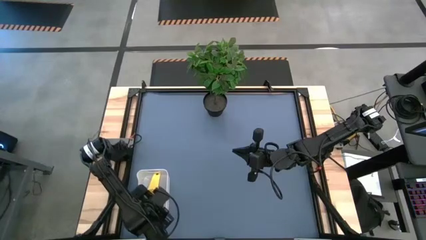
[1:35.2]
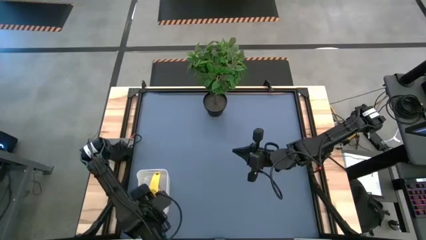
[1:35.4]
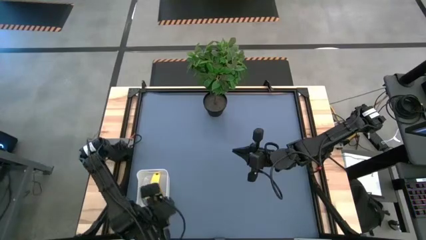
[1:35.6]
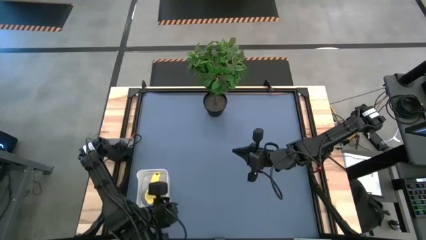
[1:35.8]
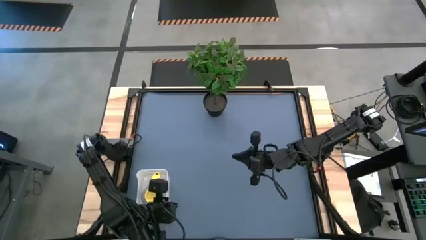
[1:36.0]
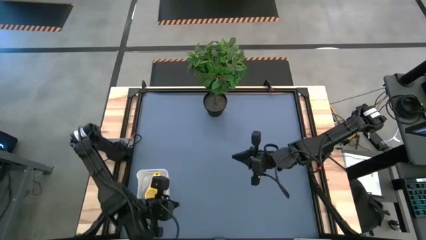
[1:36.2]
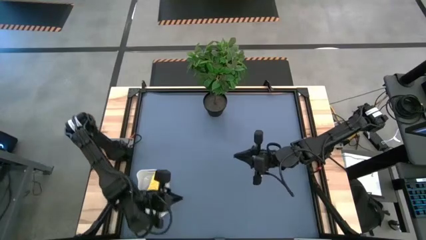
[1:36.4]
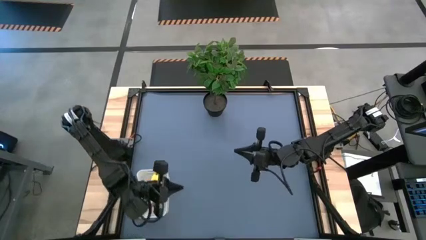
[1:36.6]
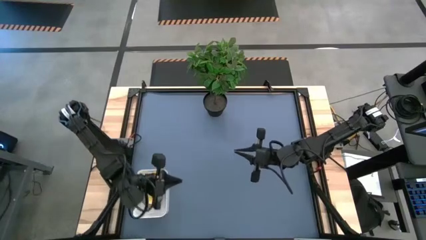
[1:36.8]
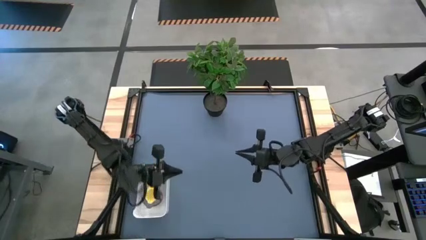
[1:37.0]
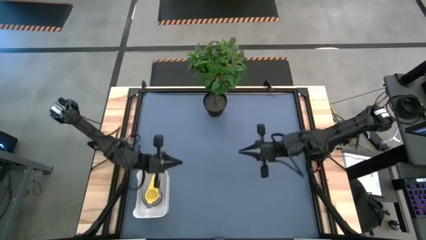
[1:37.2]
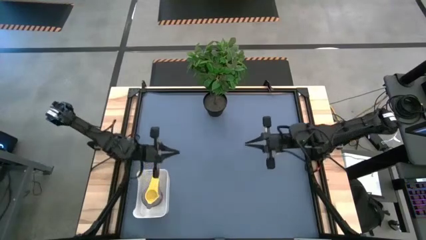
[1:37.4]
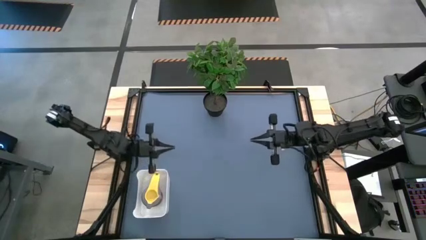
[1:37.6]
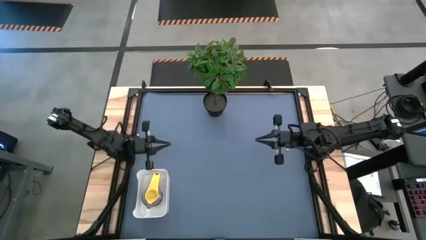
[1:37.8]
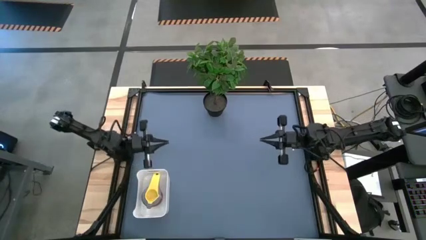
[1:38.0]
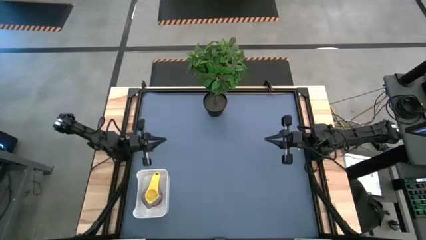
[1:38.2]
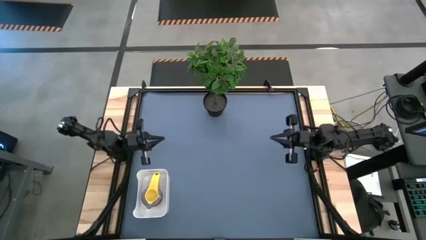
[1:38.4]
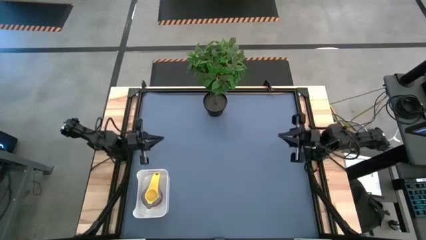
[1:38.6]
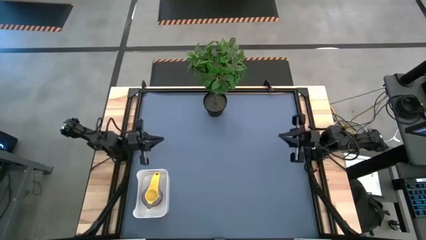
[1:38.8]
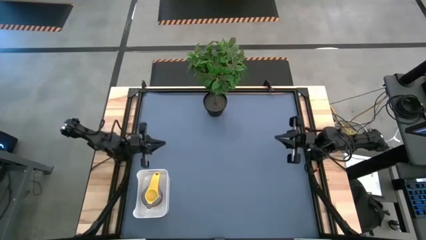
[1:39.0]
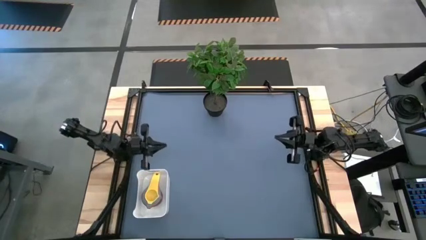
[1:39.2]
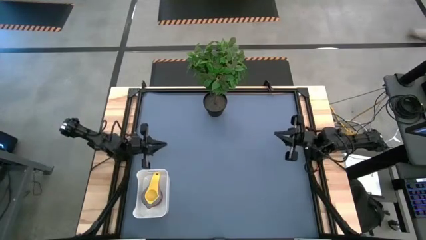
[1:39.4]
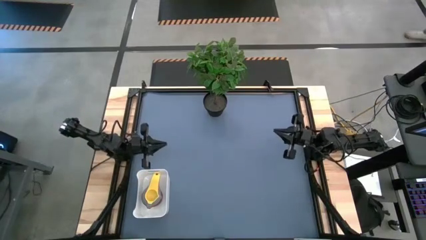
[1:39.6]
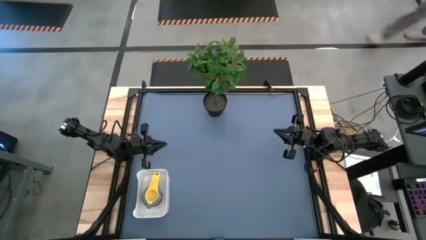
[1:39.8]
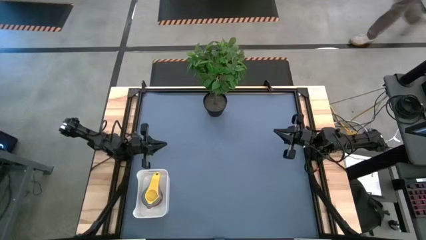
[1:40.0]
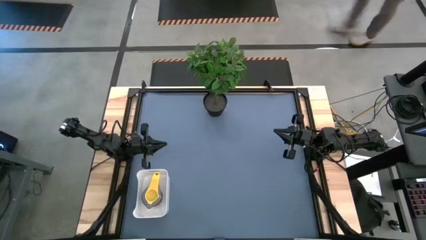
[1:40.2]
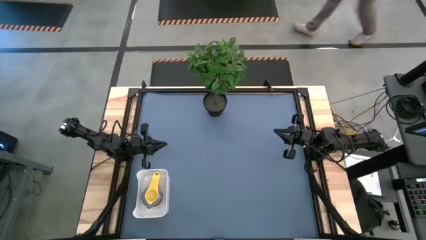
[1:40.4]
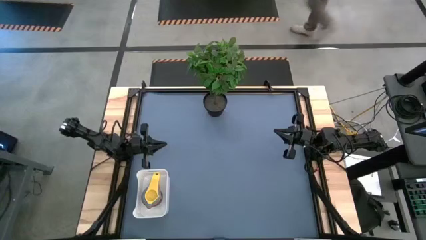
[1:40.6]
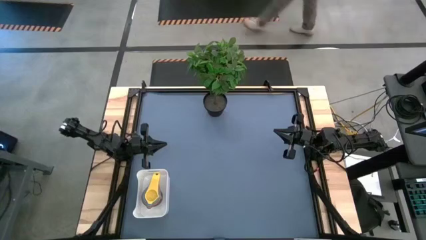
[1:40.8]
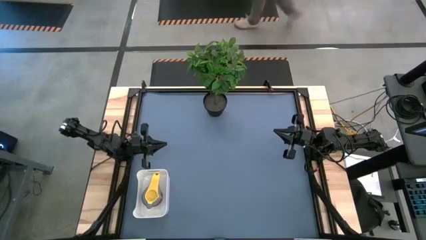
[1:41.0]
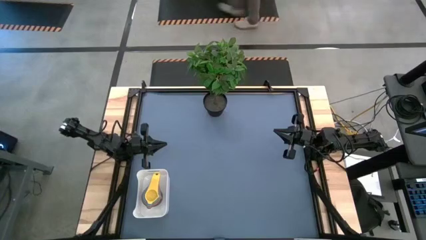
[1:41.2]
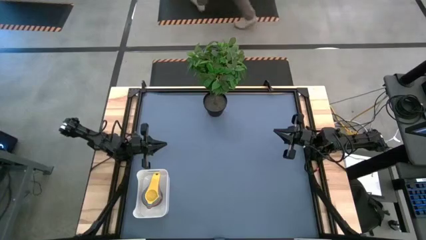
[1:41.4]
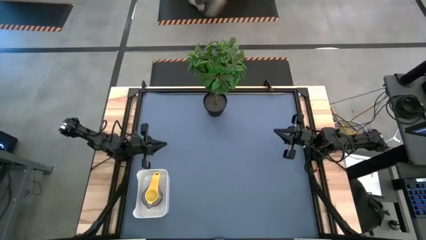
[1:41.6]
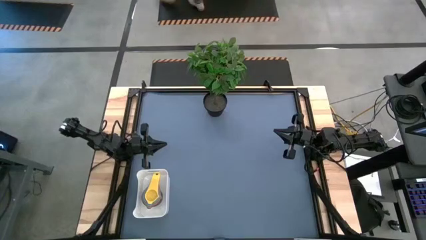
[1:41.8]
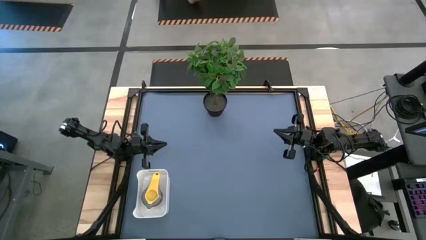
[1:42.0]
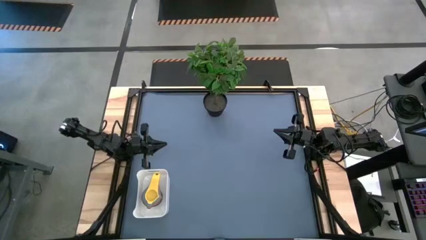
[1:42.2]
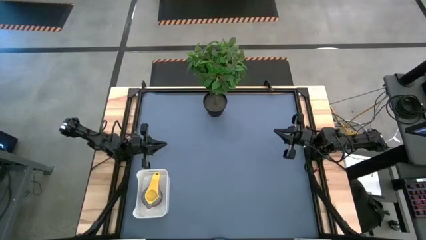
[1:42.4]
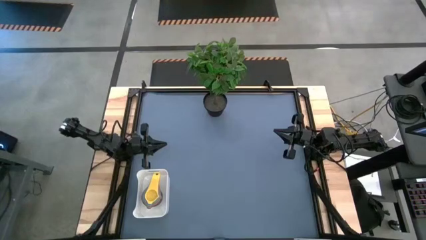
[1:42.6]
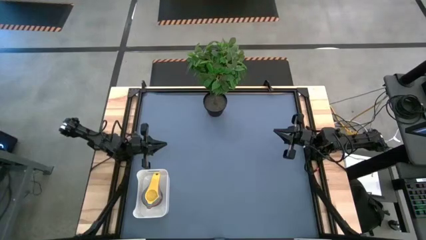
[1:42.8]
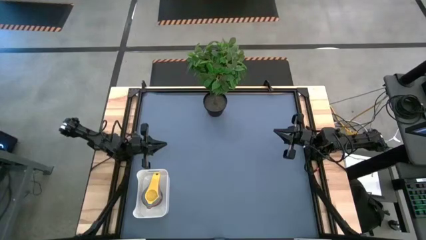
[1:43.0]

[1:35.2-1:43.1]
Task: Nest measuring cups in basket
Return to Home Position

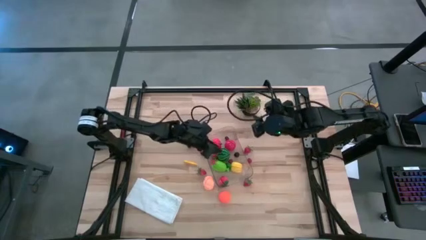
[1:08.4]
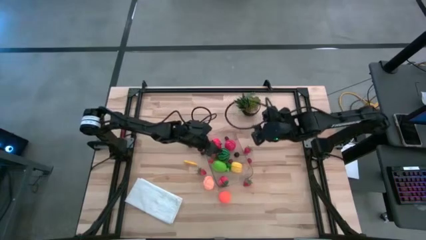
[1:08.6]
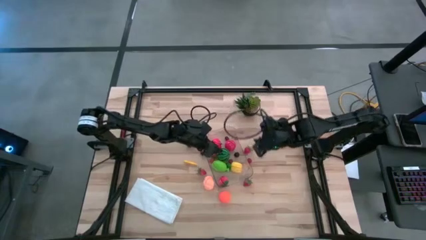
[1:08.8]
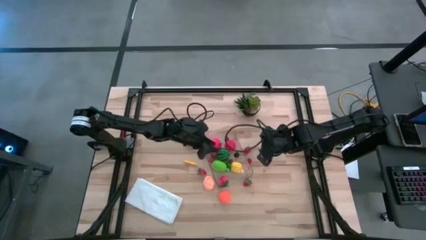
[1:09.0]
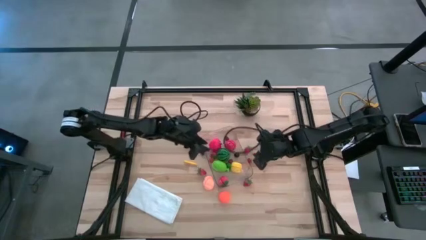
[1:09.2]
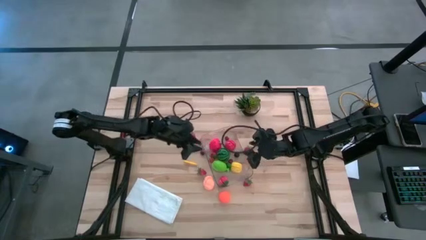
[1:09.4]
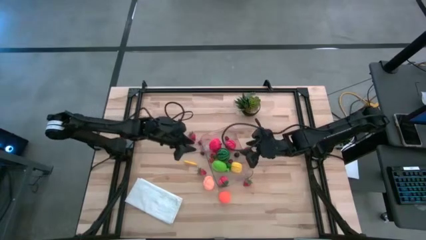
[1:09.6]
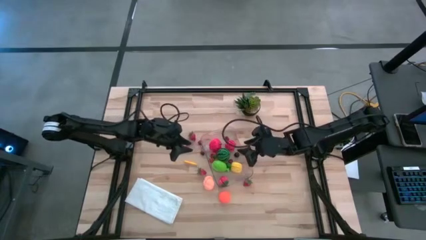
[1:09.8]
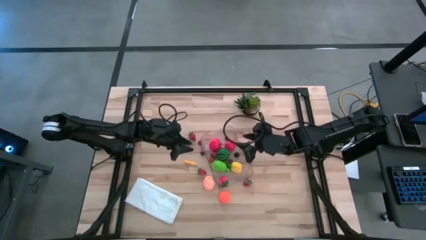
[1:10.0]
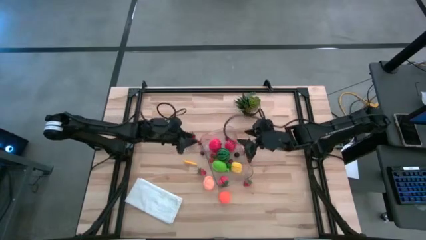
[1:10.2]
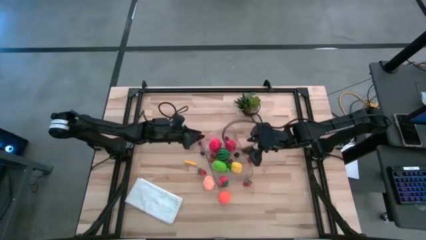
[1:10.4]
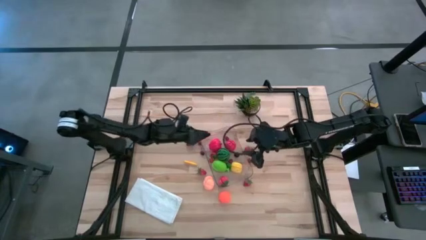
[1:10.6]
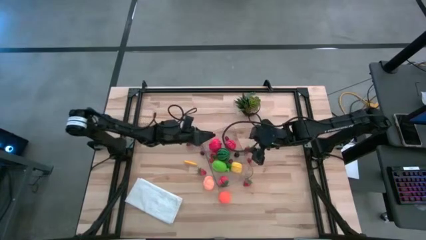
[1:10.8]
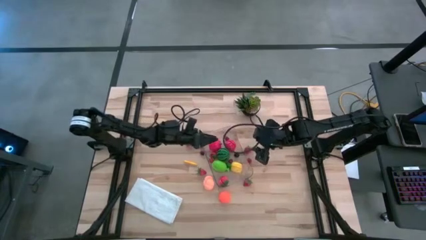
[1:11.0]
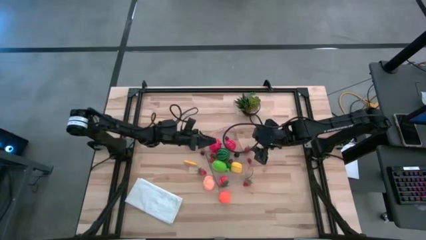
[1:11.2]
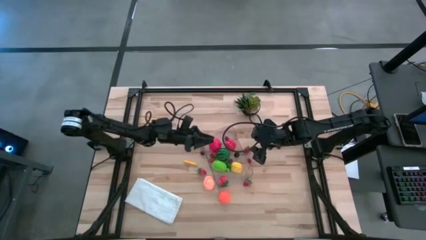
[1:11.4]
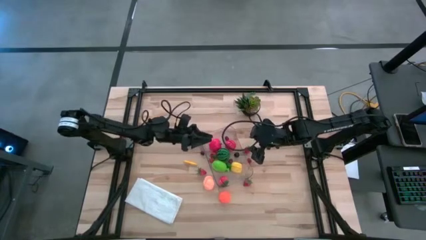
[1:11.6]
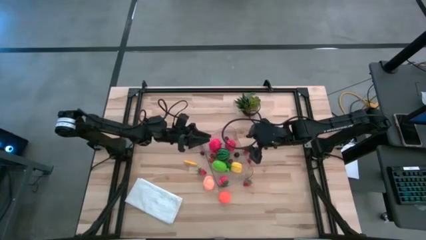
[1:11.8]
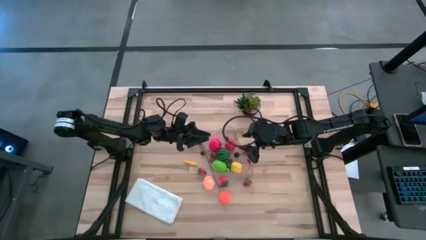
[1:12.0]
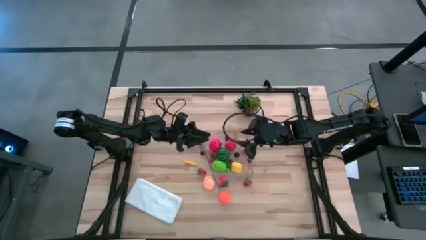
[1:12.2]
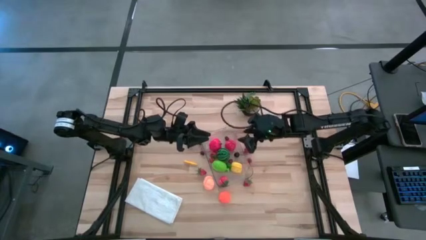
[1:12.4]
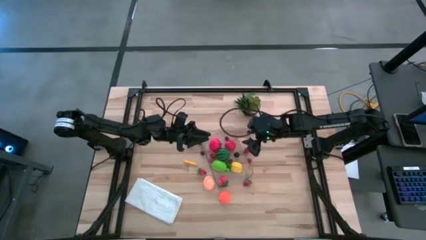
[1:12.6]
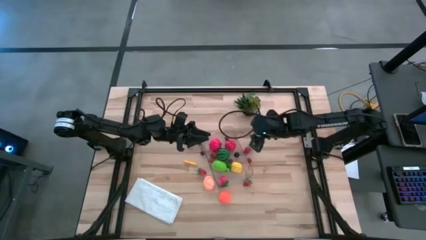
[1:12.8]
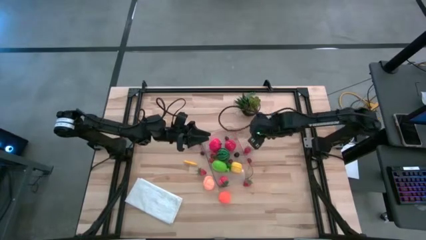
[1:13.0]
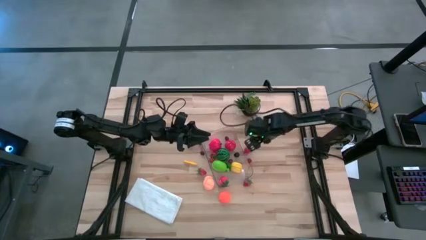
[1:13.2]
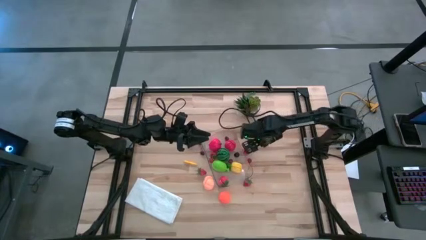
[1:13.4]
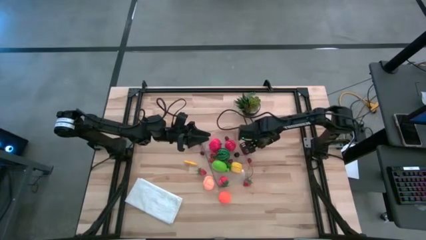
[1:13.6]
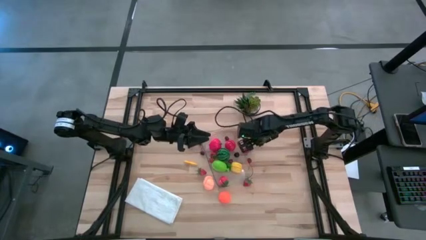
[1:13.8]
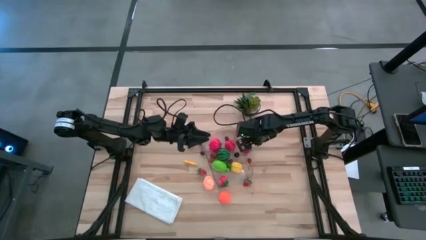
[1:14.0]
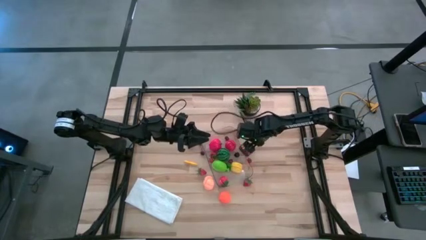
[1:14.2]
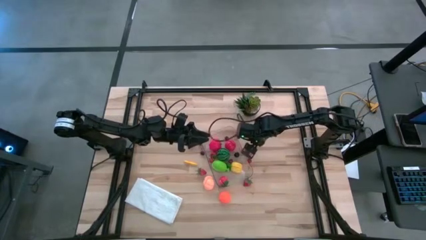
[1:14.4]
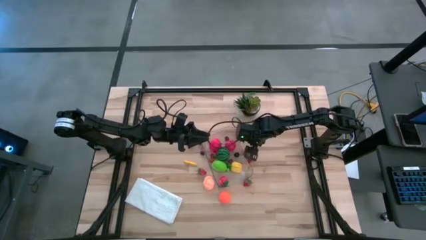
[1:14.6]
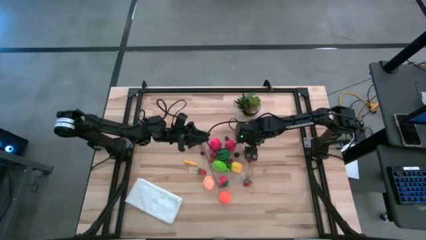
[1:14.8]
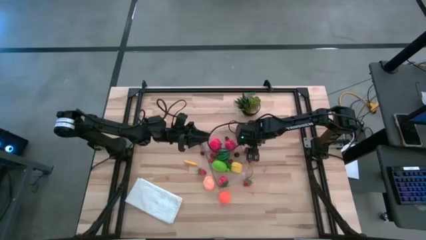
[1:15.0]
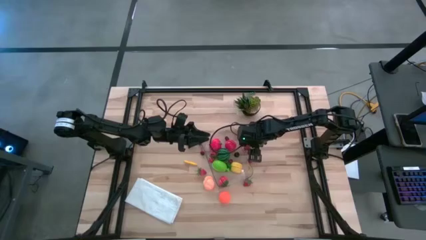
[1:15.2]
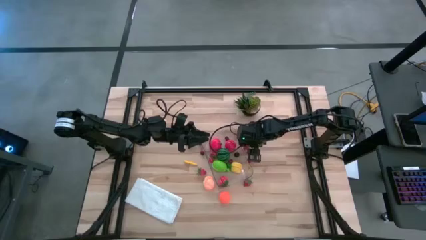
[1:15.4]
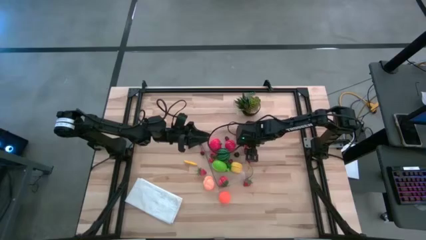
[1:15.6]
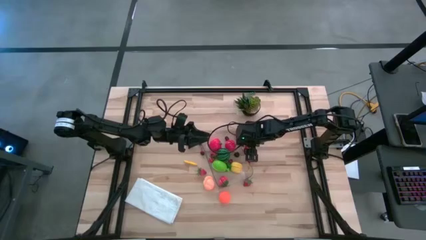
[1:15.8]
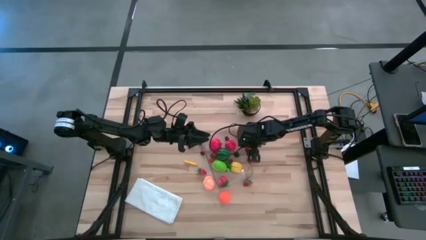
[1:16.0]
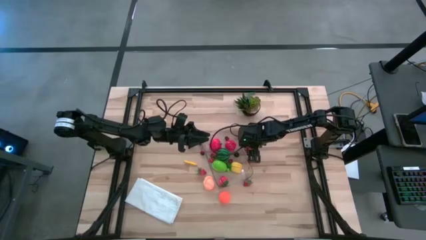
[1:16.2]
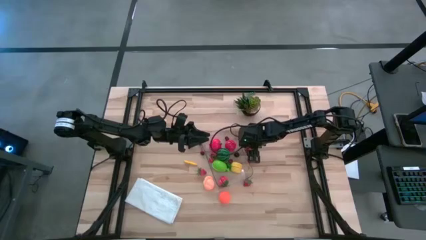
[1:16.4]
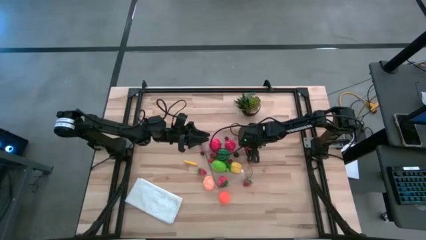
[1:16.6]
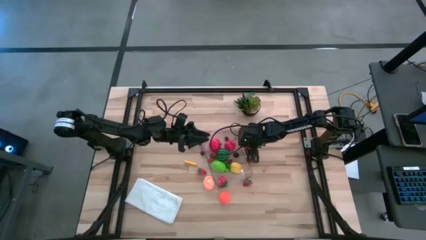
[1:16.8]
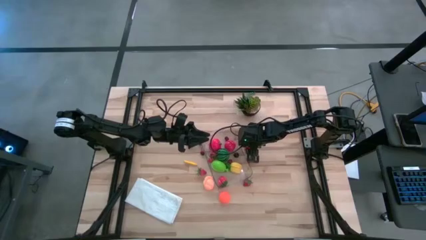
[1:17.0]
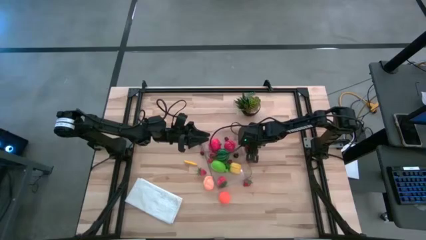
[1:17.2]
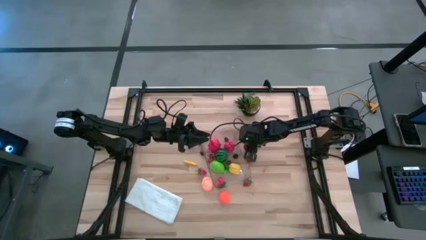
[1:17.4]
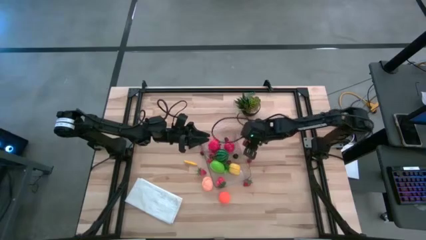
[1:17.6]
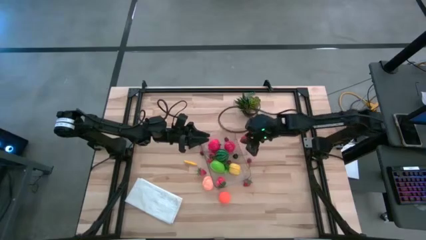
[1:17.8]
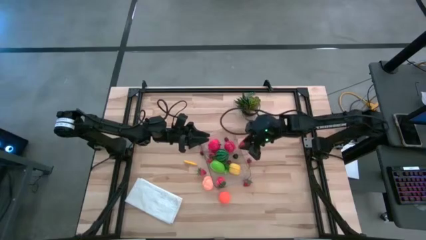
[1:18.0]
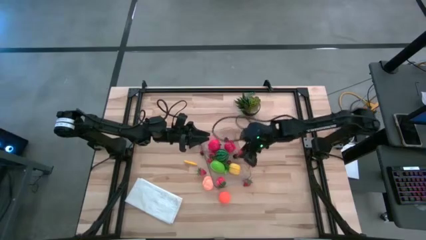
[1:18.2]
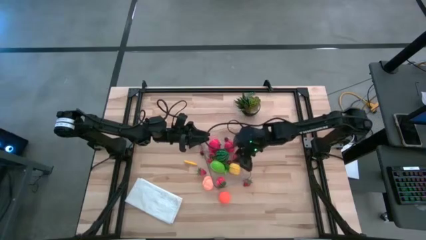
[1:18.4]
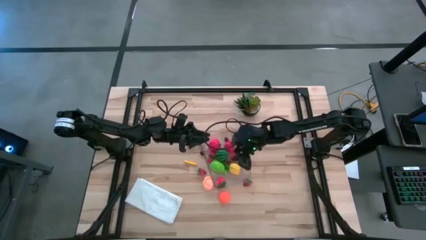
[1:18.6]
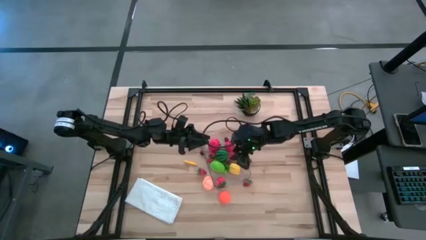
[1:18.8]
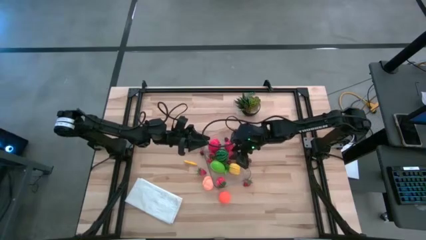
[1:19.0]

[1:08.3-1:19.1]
Task: Pick and placing Produce into tupperware
Put the red strawberry into the transparent bin
